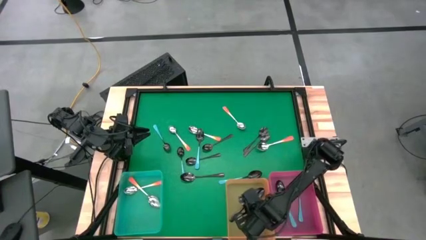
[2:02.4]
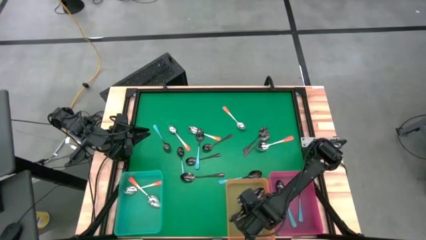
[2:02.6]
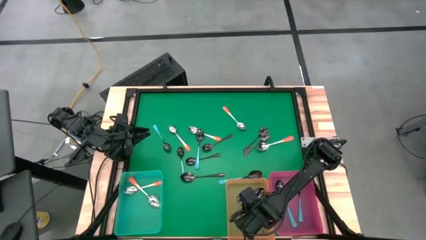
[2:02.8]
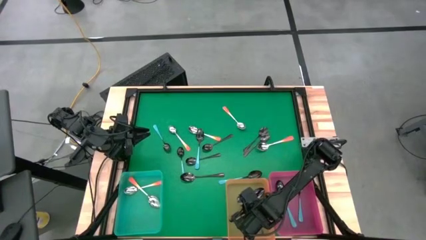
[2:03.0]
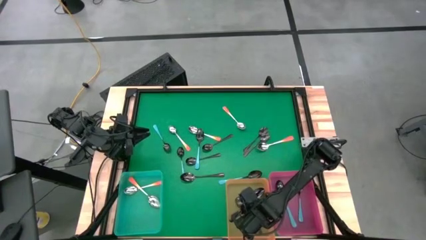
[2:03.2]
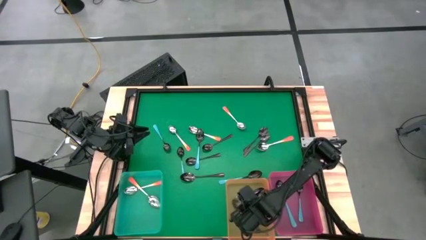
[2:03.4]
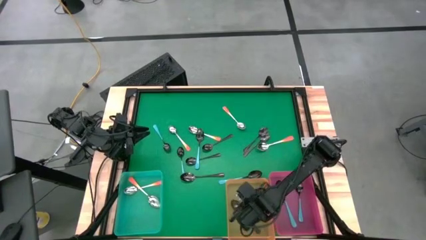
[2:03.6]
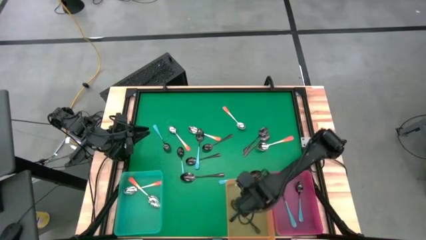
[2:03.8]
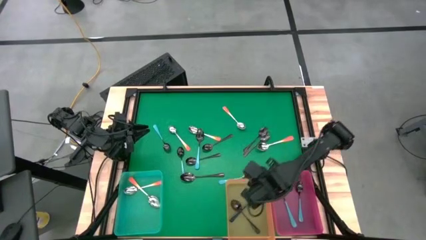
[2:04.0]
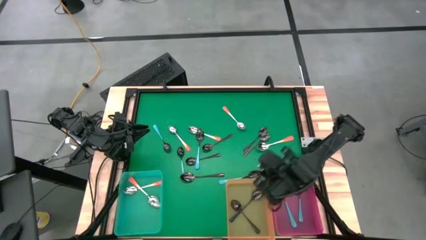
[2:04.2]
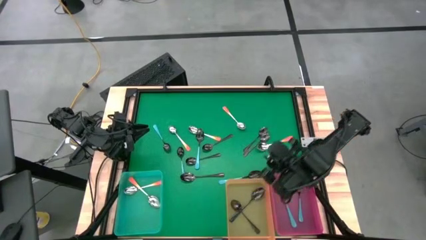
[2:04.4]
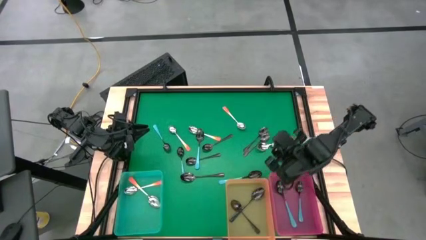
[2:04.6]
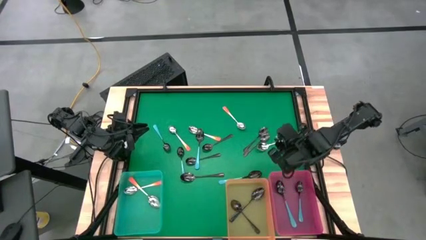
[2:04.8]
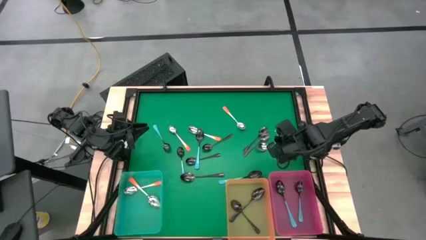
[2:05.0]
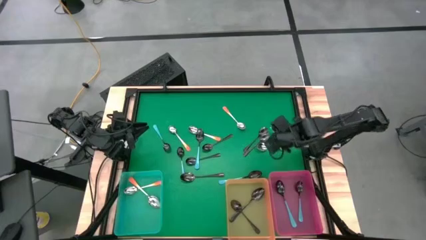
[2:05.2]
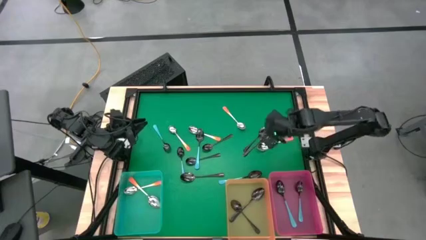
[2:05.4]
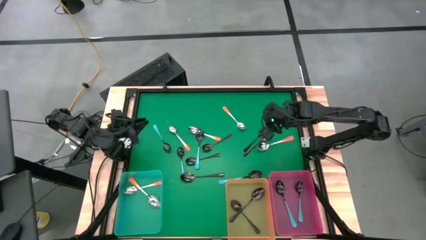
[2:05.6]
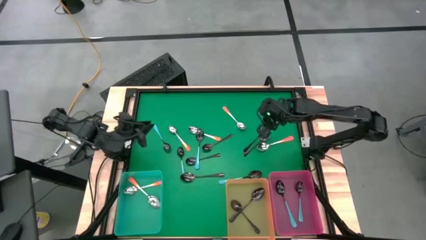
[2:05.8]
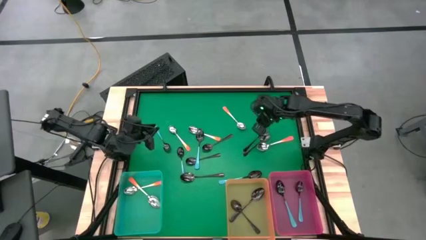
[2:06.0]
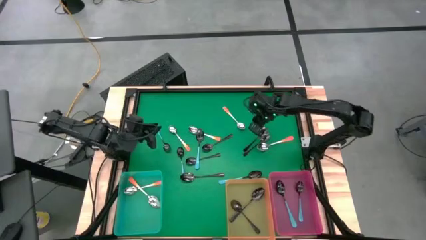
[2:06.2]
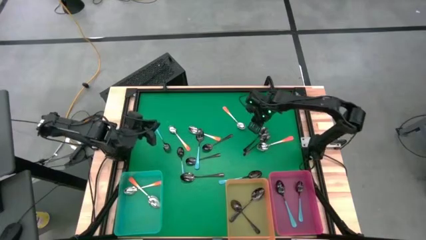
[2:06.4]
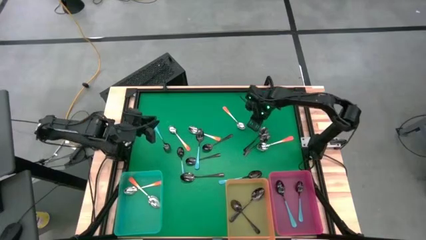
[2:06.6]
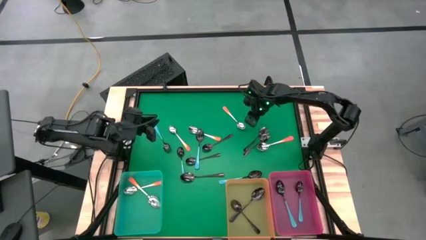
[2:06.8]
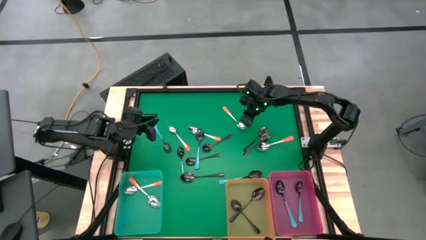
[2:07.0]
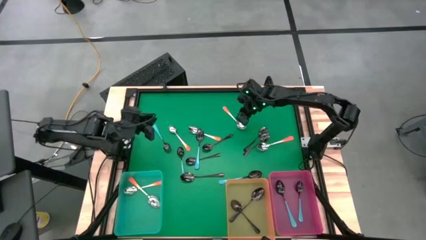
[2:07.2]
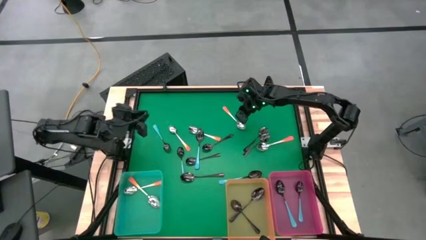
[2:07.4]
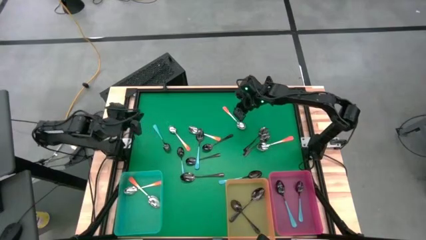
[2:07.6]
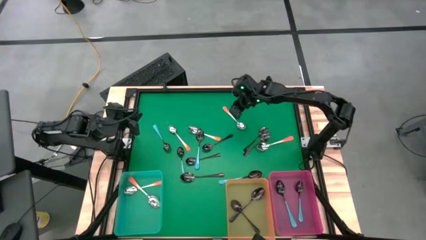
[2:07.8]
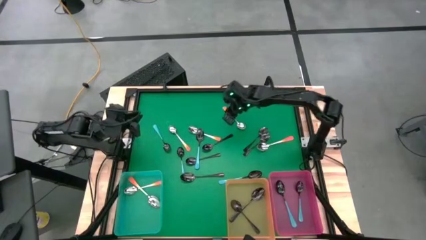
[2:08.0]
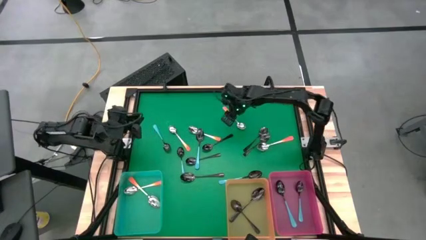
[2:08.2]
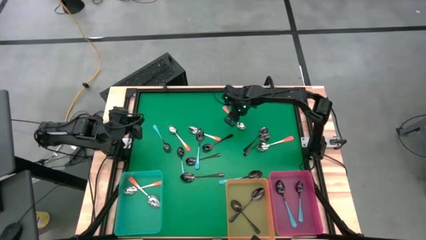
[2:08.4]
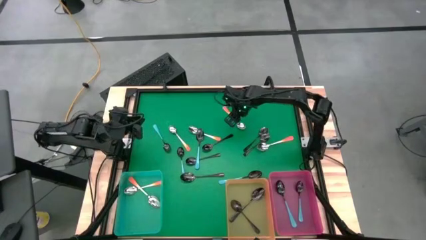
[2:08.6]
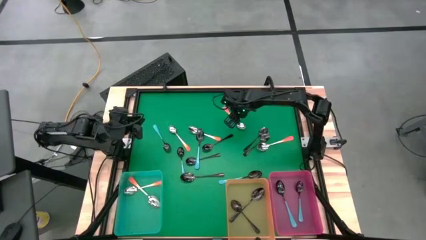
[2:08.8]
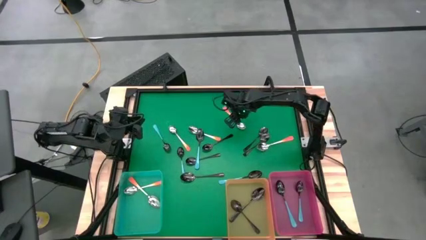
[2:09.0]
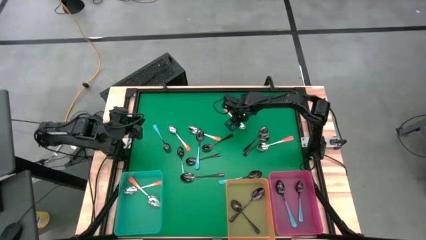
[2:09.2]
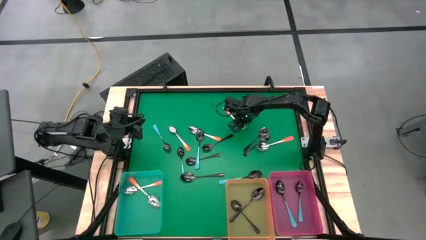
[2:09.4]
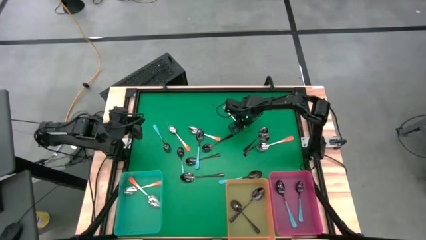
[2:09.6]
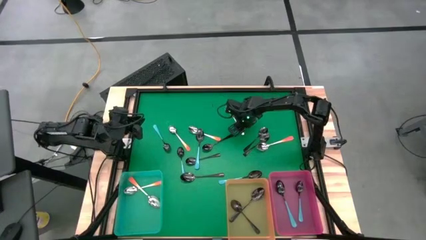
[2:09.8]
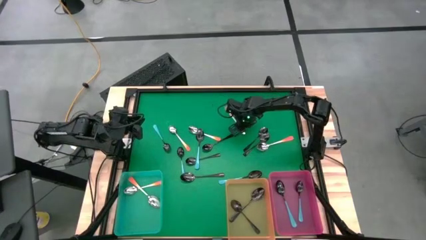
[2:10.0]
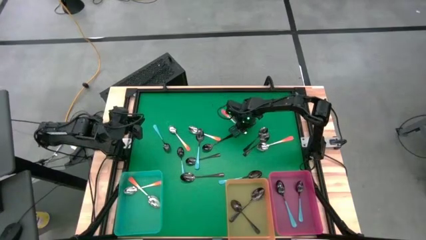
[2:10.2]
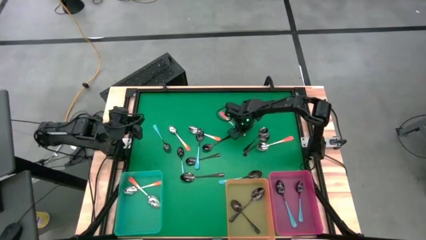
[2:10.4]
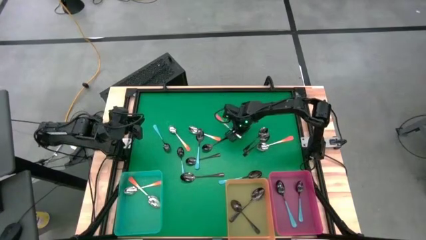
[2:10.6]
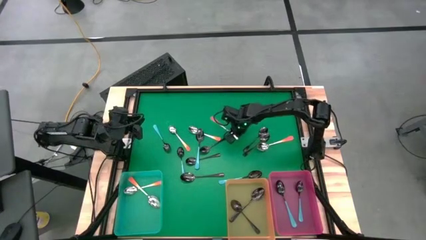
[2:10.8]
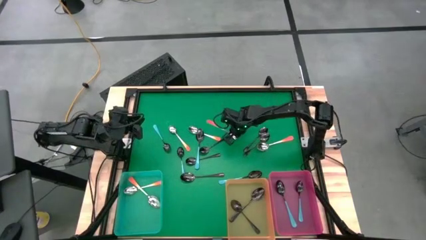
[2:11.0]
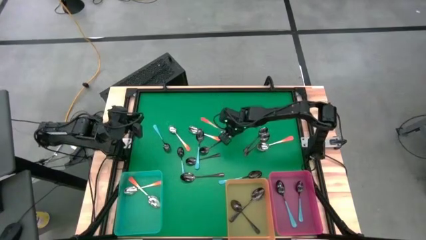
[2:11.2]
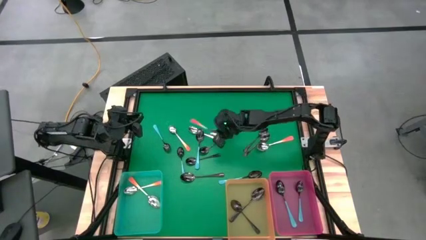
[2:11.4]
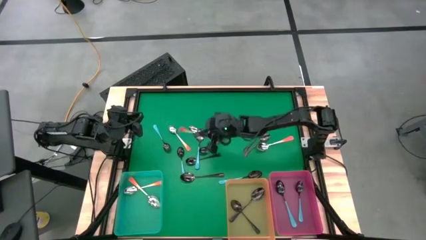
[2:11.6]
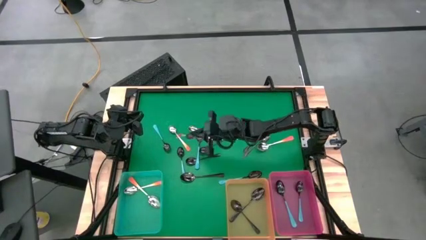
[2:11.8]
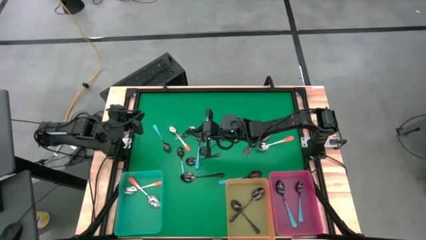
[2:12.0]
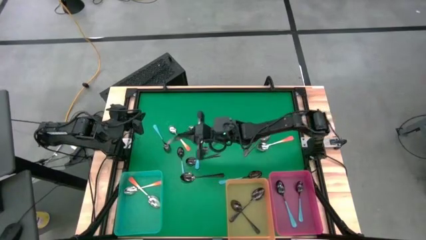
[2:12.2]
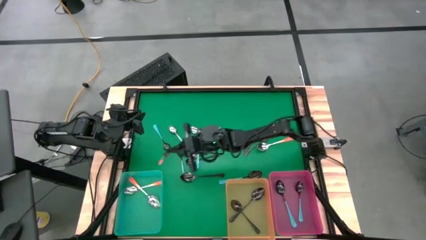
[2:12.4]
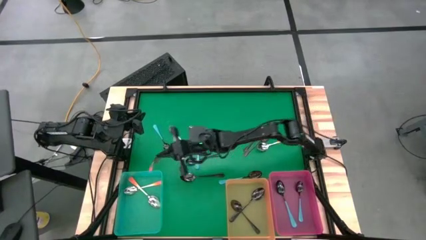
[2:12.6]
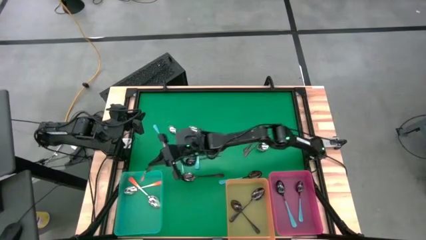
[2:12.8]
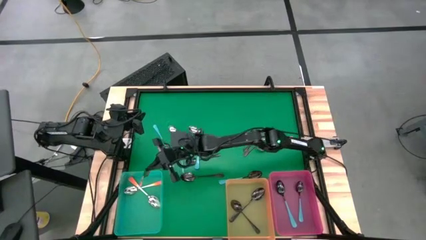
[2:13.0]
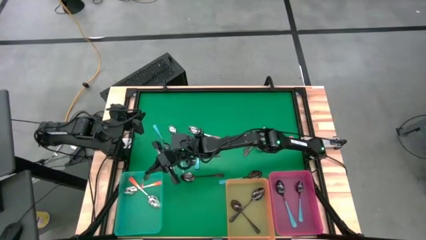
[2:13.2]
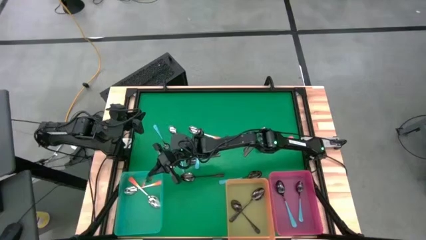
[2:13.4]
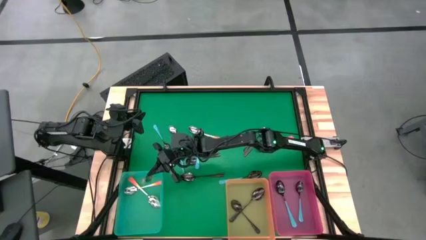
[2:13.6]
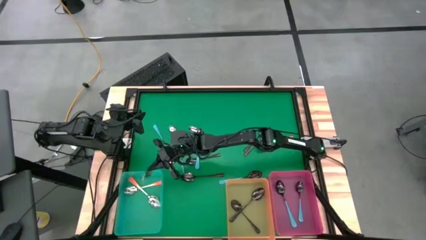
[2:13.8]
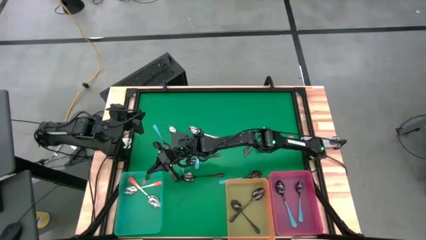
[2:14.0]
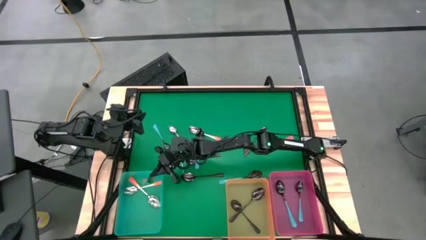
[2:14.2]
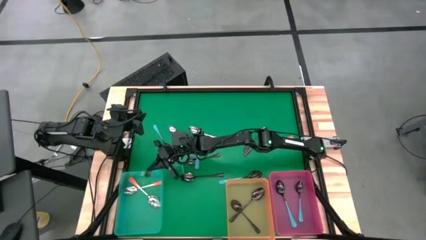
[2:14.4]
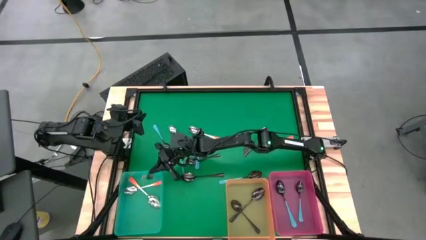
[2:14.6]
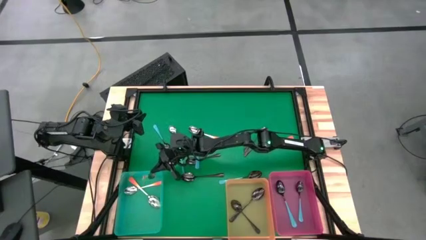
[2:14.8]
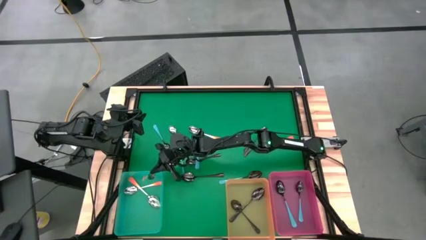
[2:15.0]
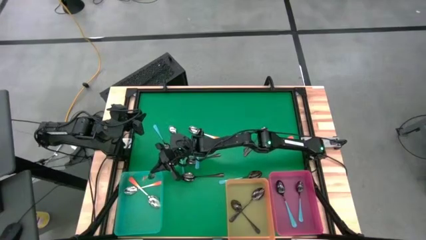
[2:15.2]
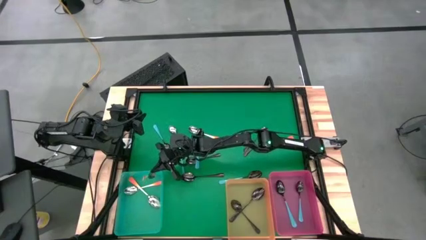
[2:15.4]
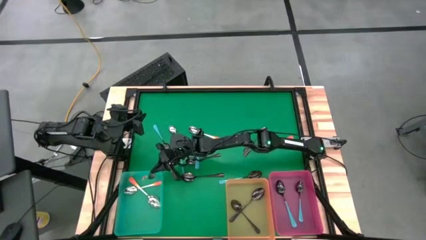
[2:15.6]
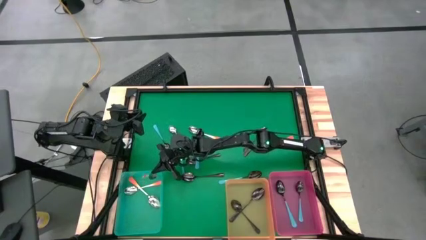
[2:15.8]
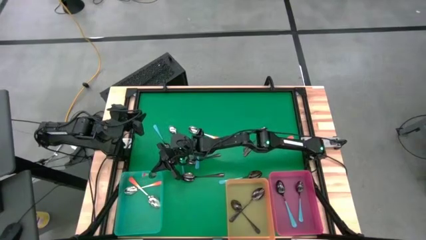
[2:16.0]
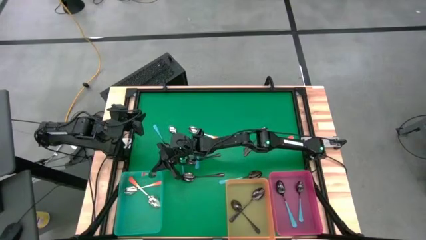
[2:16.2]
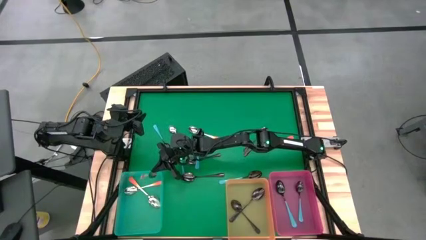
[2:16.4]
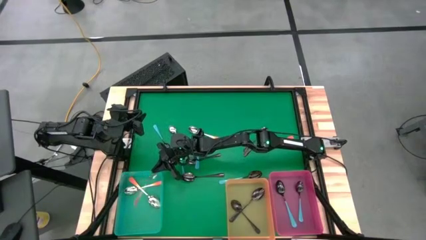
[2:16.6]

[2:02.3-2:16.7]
Task: Sort silverware by color (type)
Put the orange spoon into the green bin
